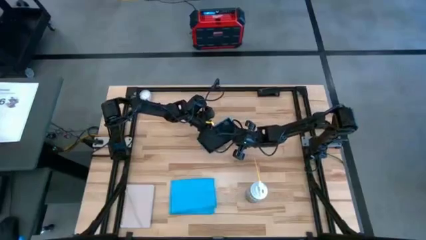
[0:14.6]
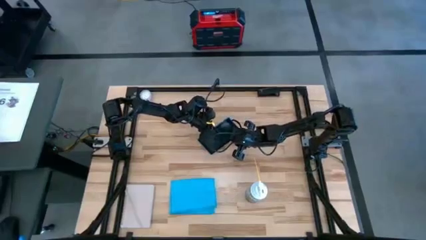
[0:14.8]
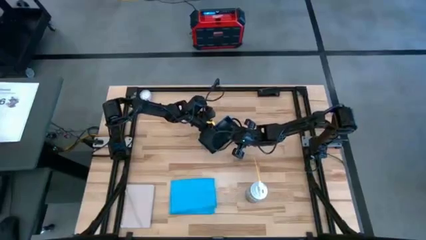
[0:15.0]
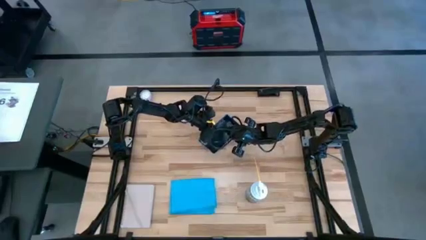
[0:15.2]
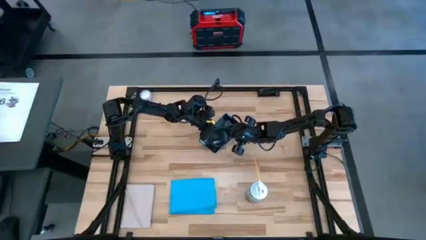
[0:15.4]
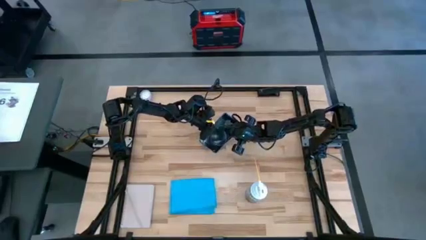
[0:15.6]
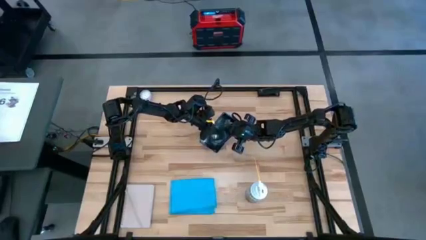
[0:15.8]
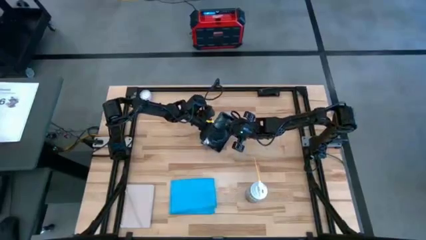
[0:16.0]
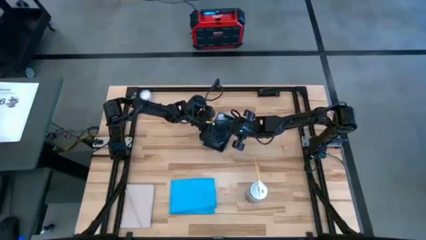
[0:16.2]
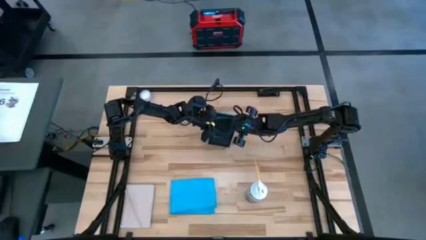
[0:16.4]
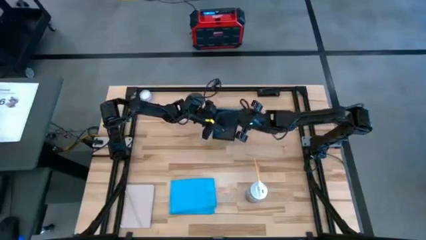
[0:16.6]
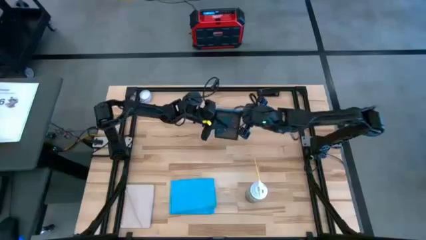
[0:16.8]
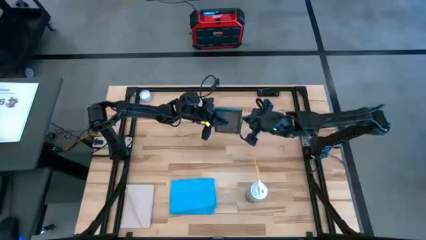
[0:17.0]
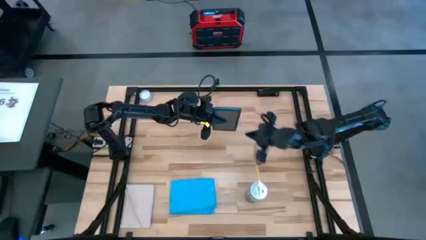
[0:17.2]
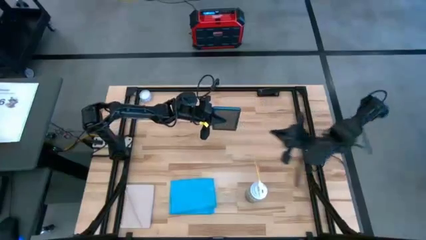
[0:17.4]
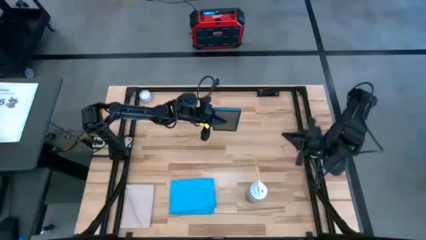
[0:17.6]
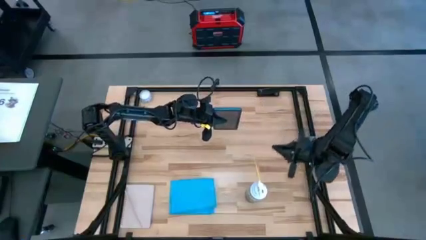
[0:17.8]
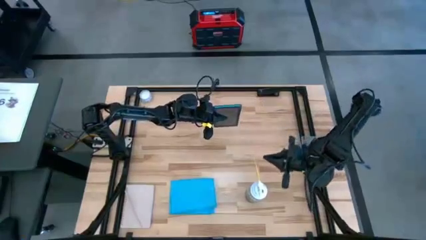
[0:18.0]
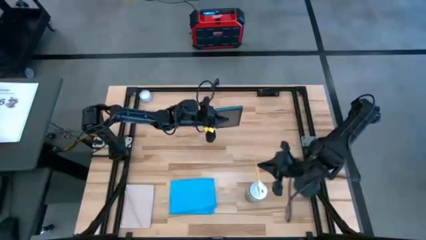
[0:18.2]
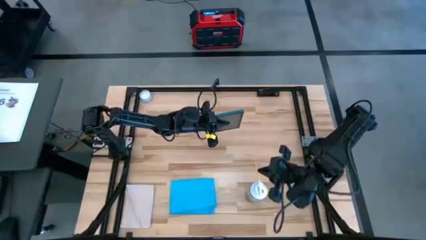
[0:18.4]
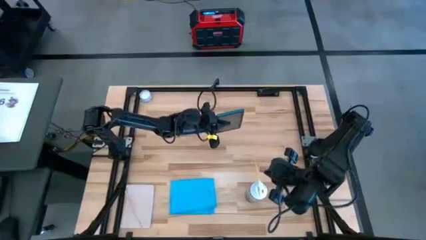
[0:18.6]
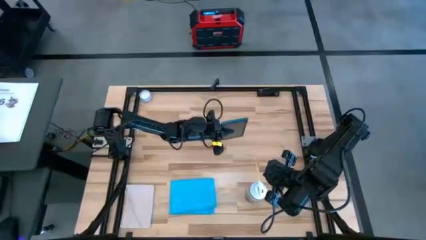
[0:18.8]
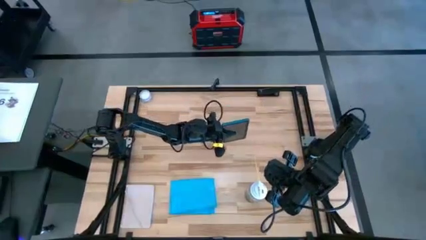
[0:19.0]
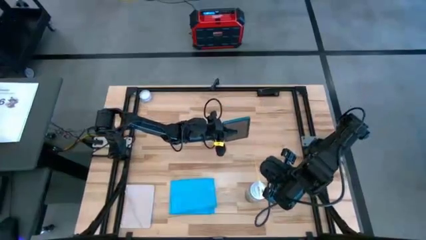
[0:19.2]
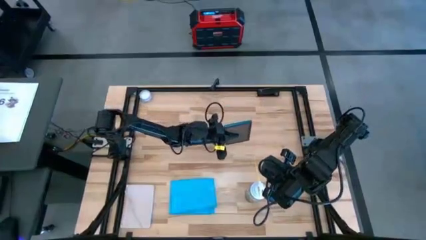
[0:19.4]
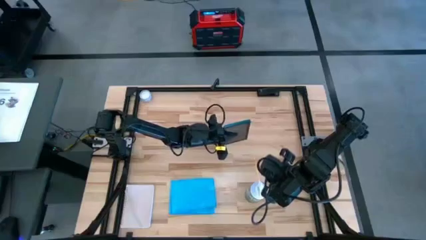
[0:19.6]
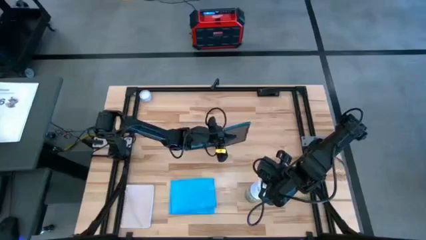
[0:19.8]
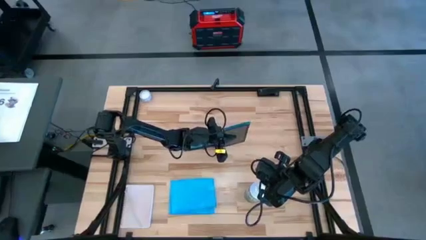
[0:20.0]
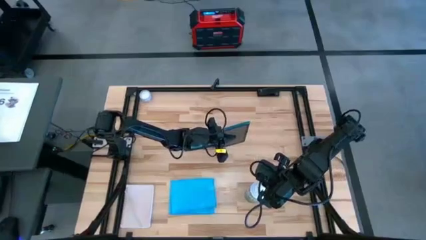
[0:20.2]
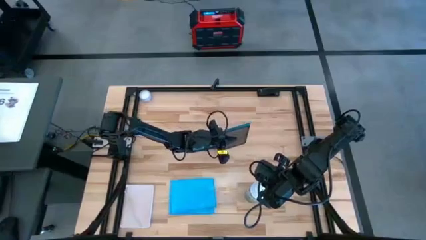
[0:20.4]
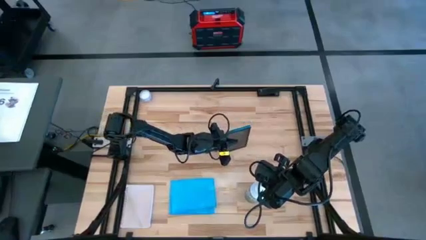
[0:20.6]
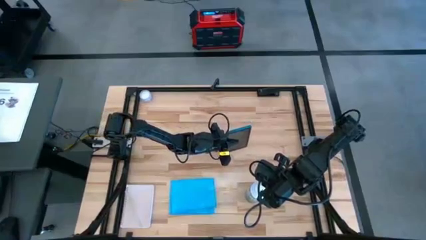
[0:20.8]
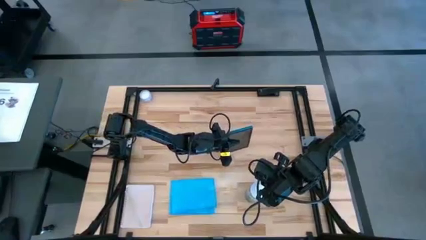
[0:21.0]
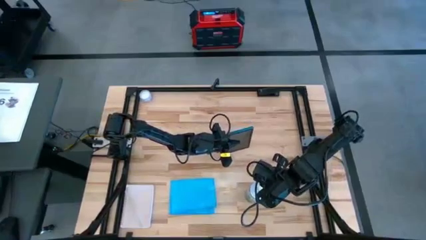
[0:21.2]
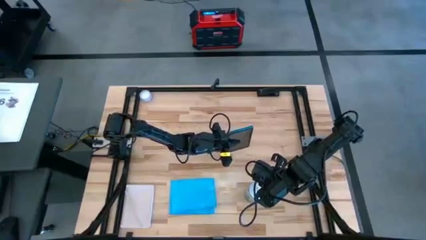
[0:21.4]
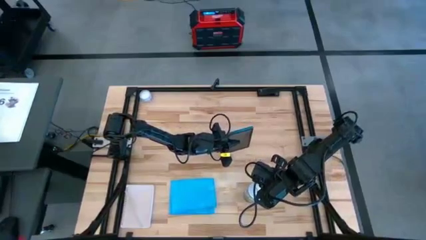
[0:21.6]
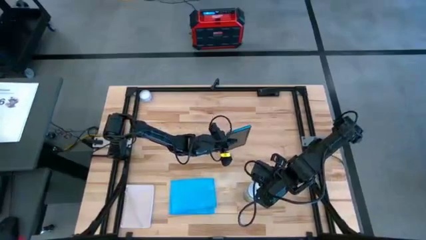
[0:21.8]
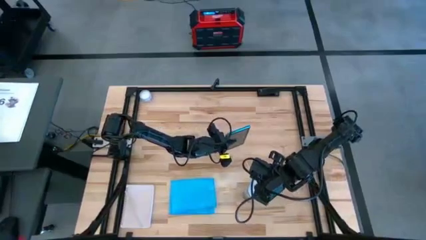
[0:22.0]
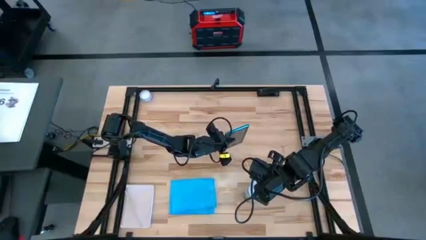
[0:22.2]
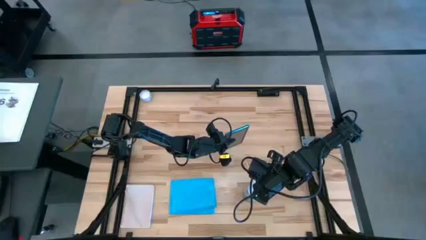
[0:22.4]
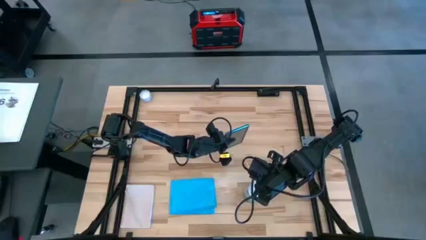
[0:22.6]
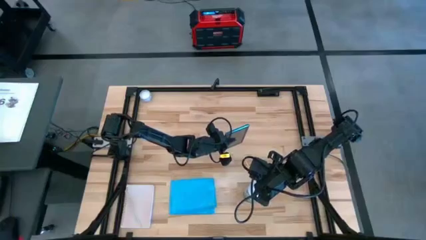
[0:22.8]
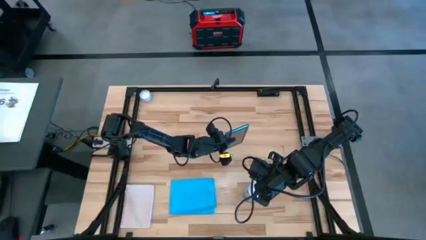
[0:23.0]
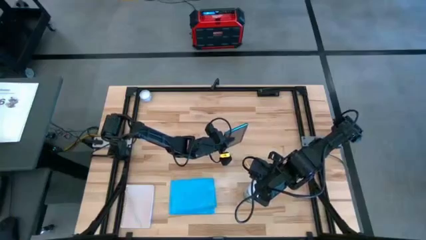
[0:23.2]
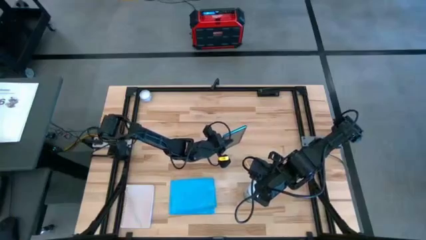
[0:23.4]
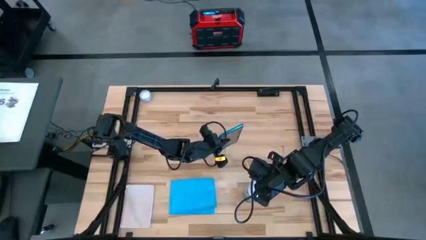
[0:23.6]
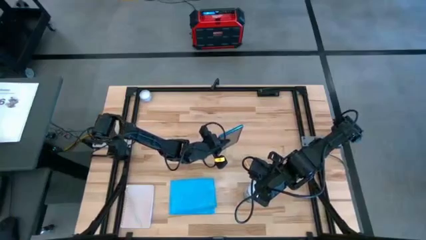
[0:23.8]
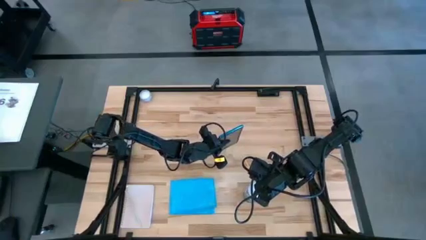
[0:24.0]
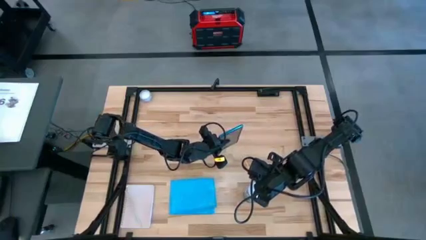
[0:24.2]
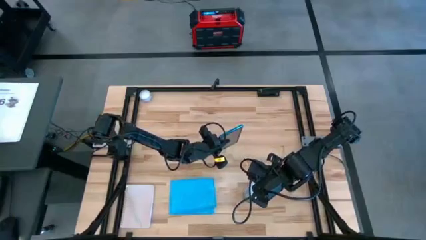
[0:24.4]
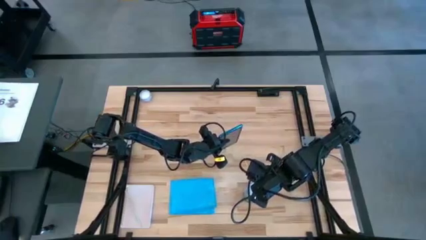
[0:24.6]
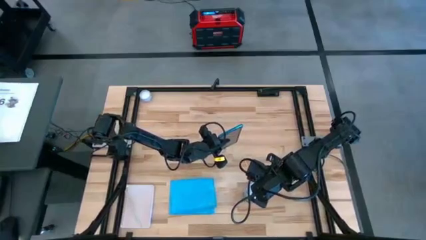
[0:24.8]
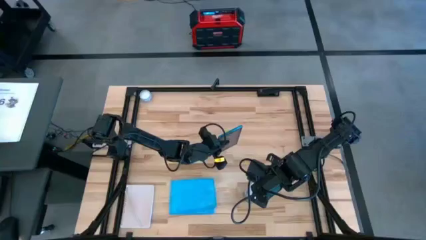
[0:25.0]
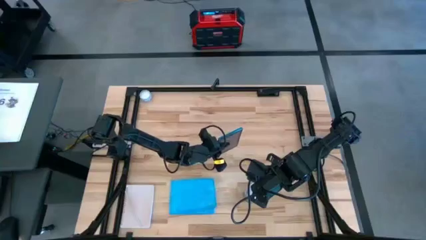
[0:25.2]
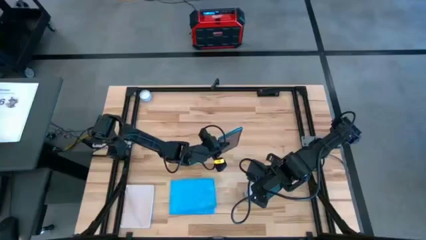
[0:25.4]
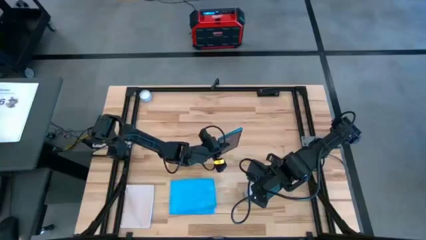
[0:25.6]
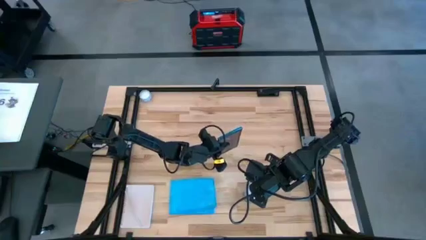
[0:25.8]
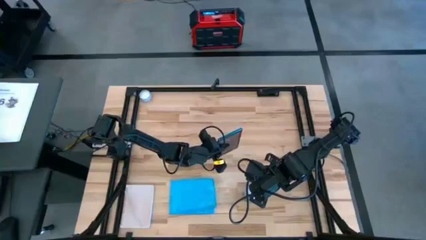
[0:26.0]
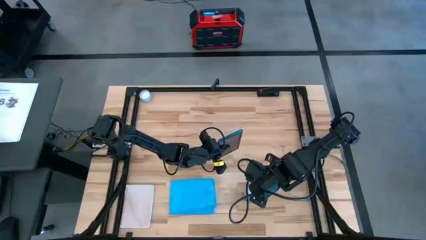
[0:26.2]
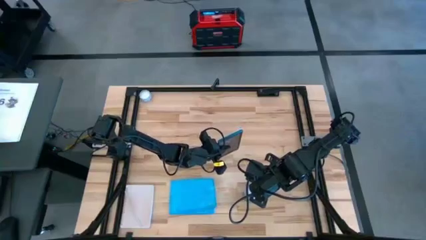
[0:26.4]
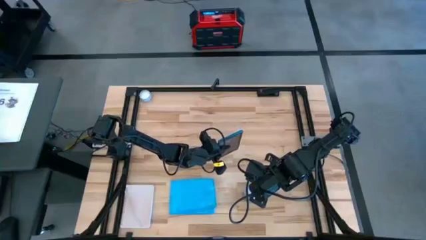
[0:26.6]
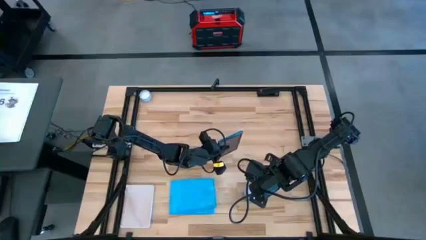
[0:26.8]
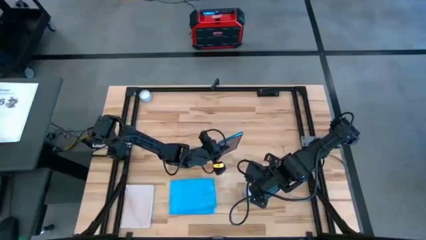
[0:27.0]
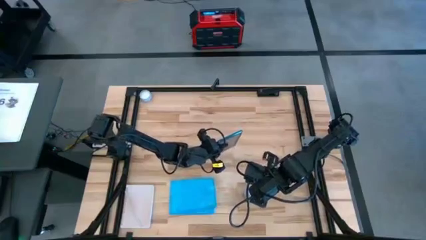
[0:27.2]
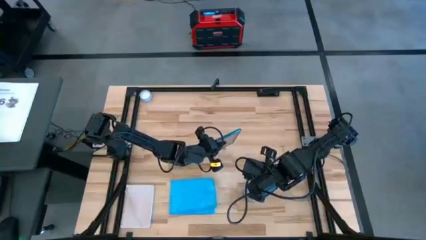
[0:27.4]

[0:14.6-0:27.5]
Task: Apply microfiber cloth
Spray the front of the blue tablet with the spray bottle
